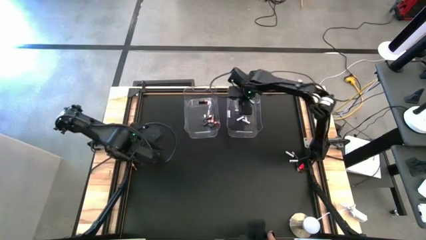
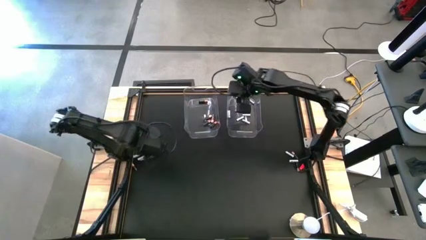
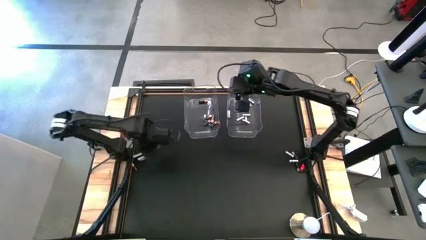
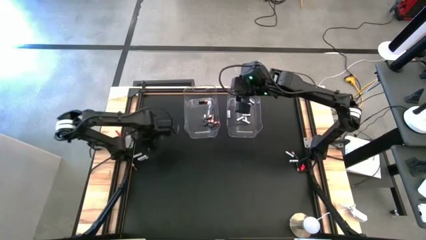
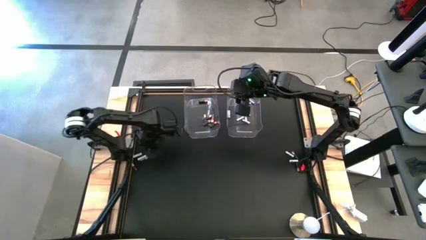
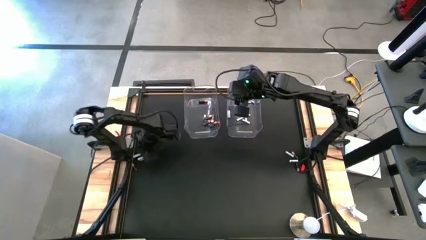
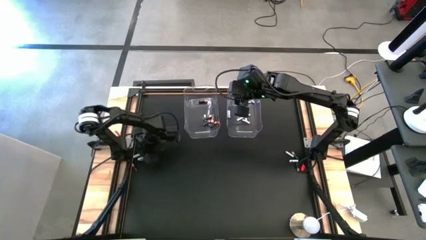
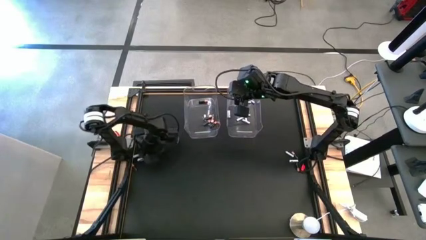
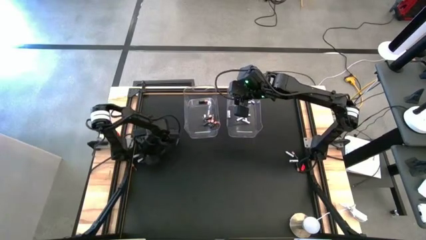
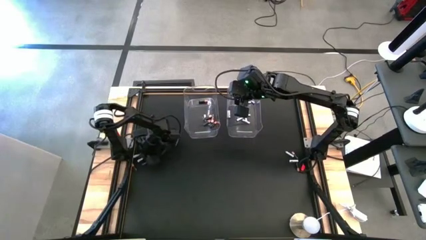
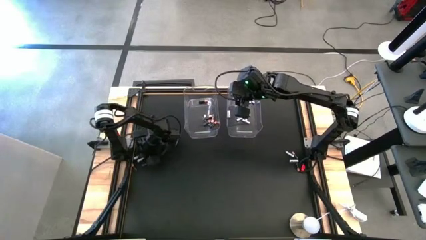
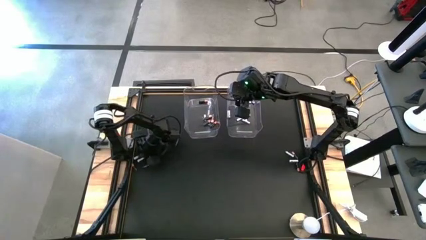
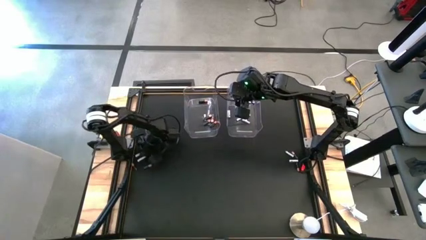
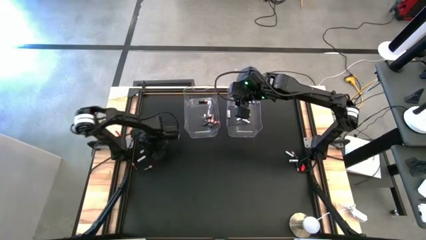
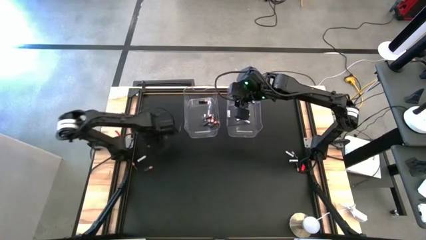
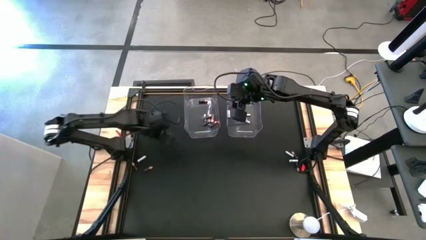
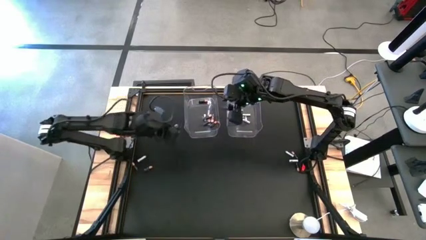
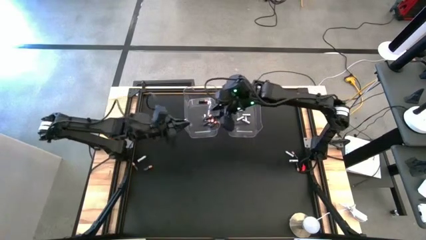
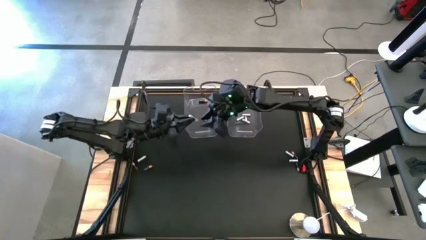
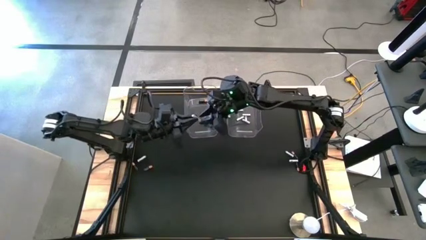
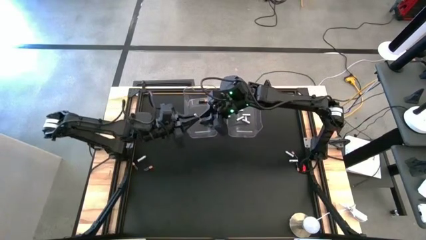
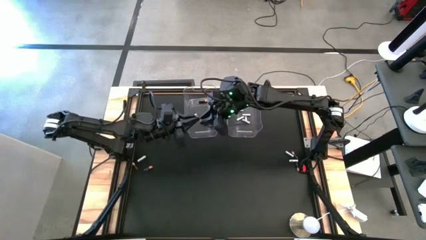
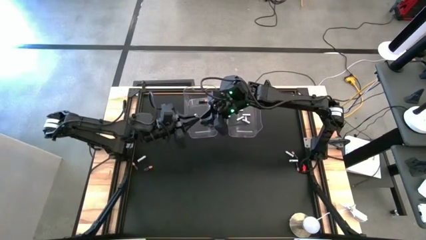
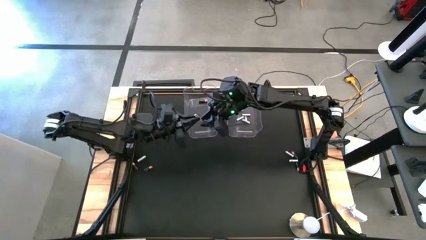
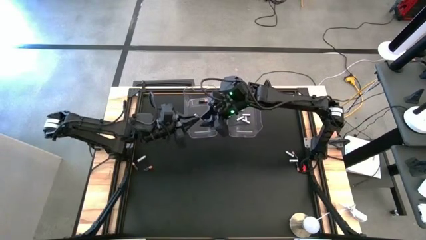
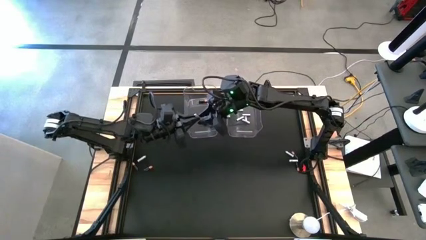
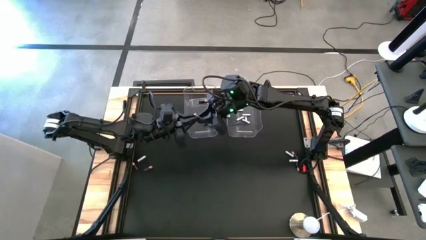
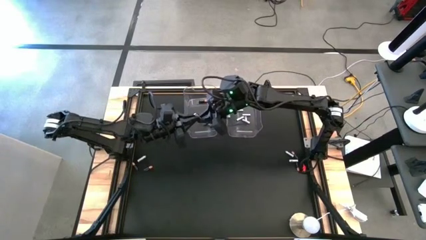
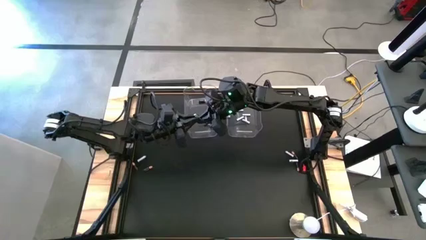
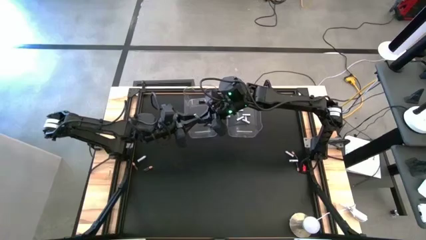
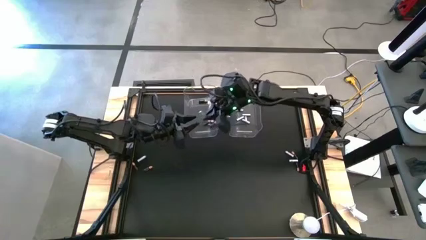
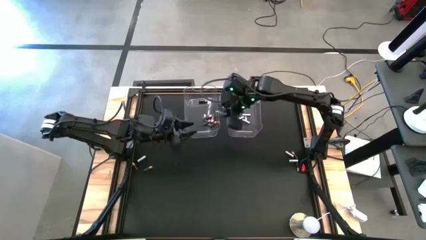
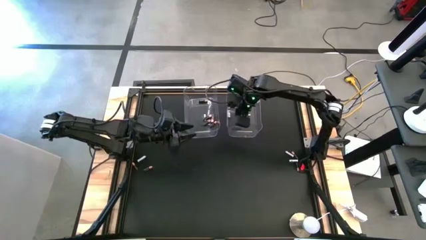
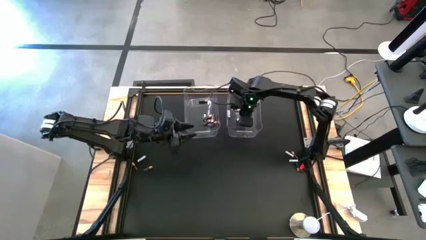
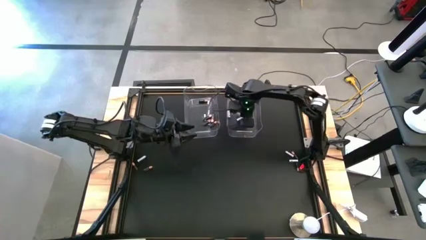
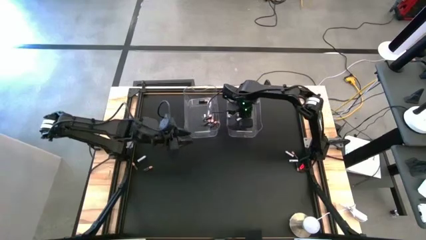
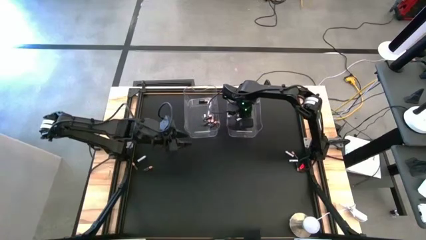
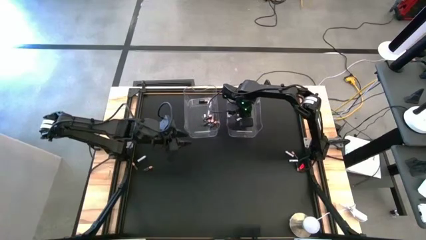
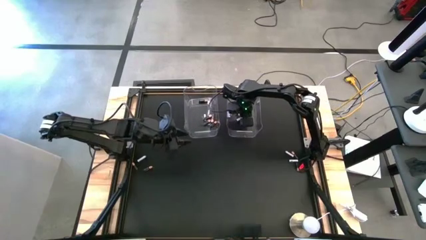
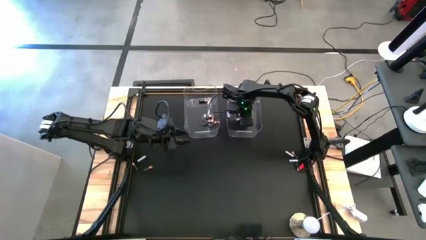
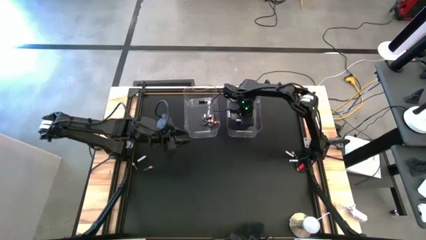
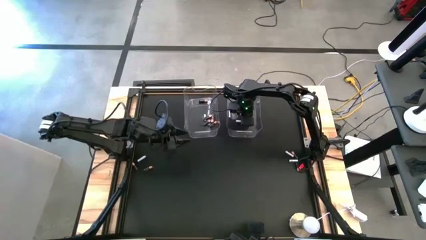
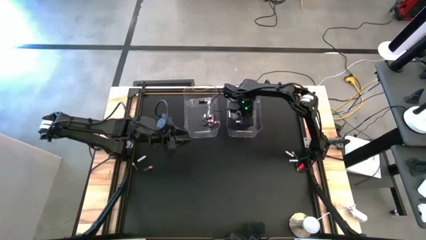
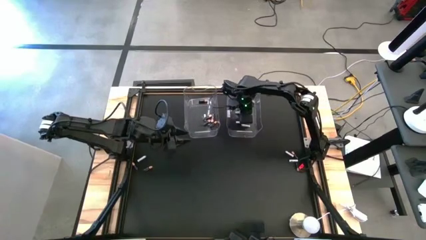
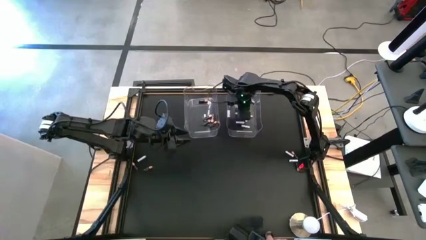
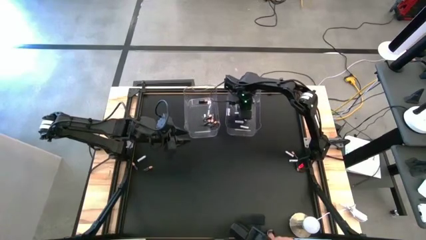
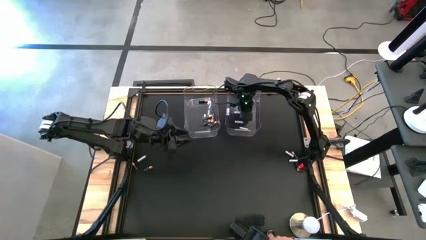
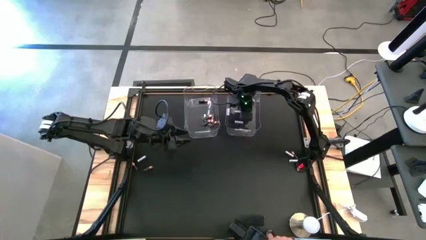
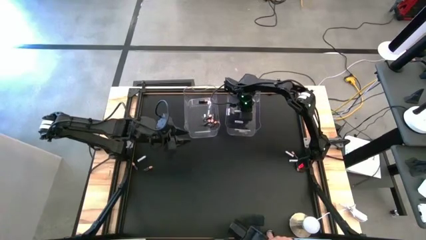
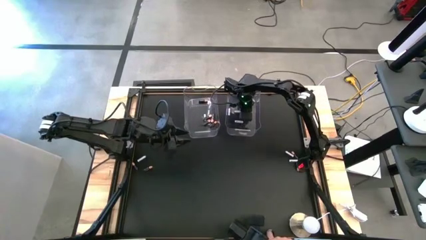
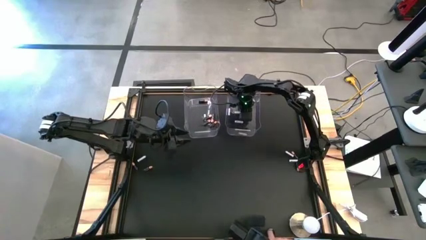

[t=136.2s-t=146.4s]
Task: Sort batteries
Put the white battery into the right transparent bin

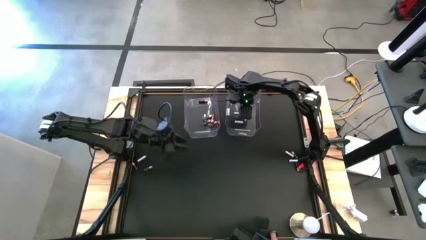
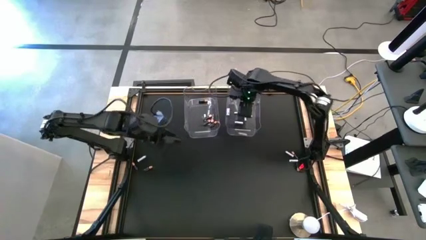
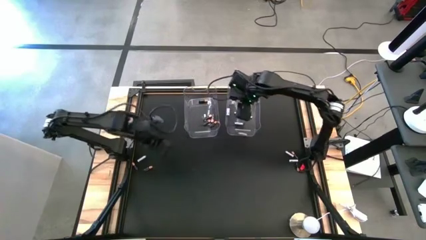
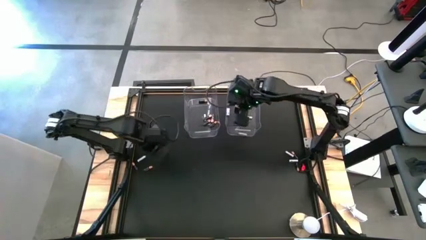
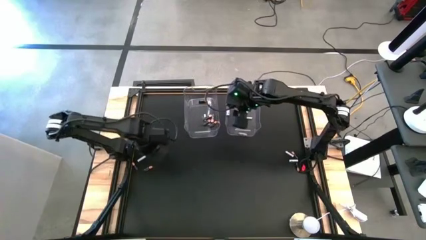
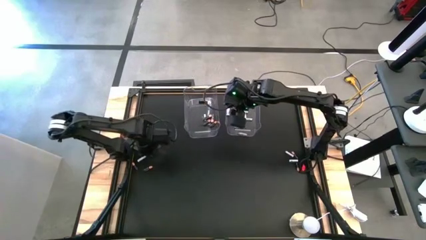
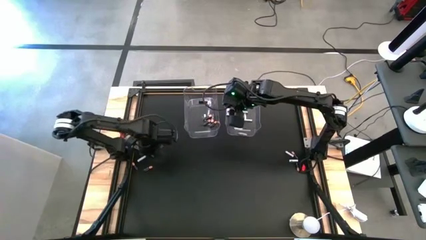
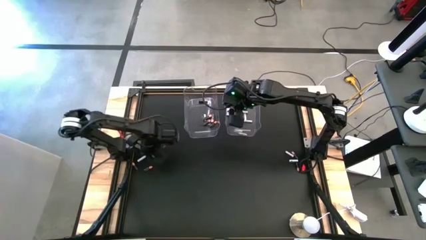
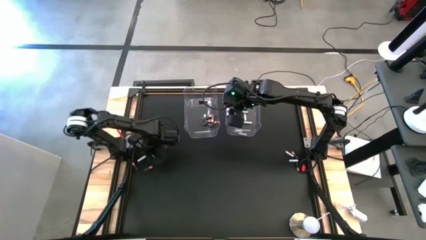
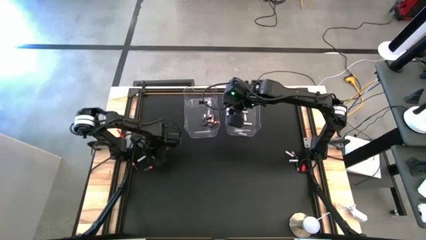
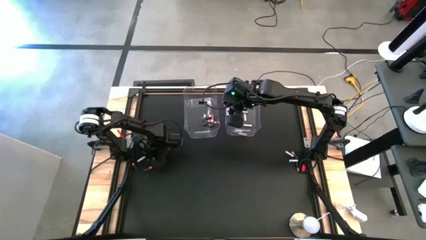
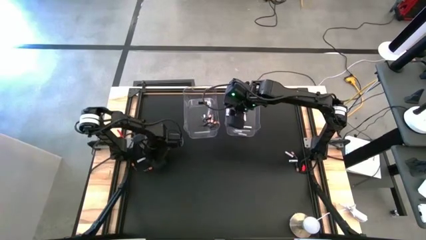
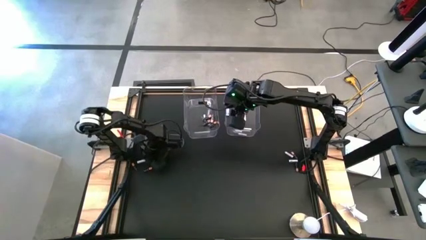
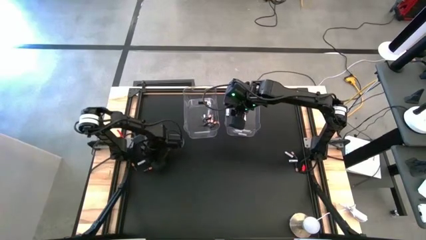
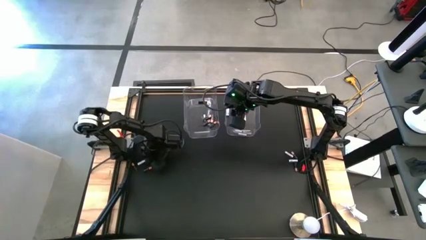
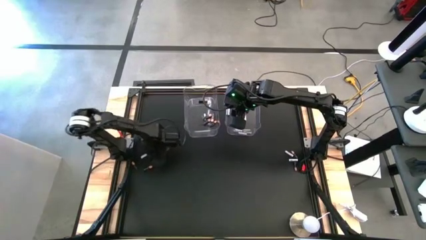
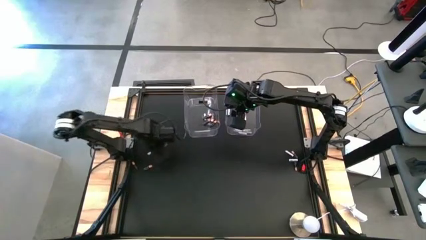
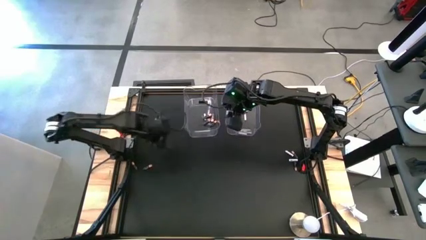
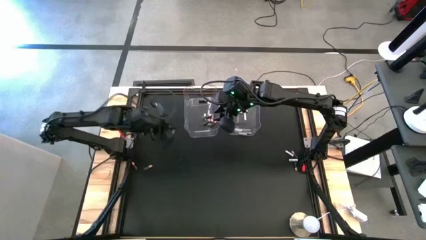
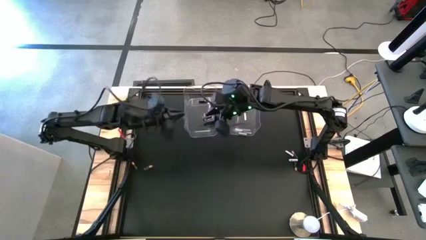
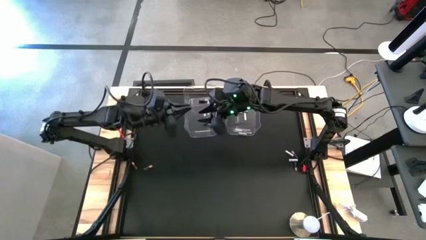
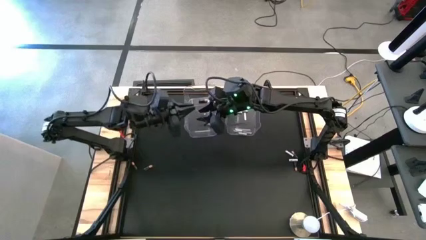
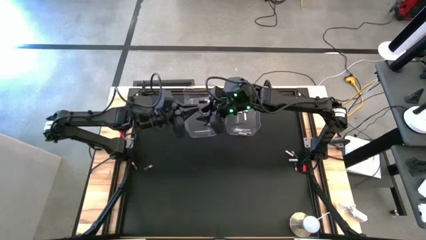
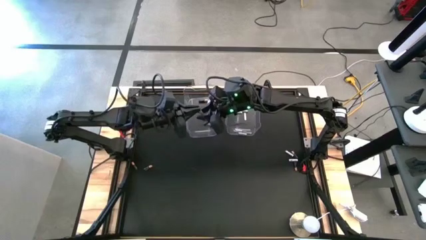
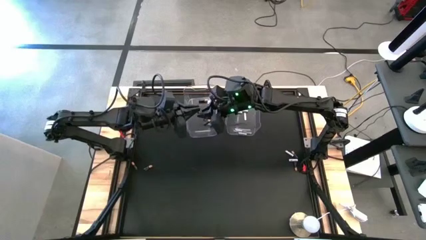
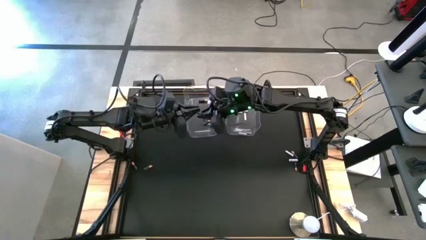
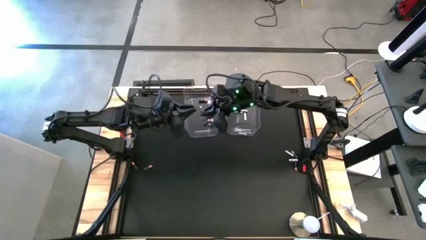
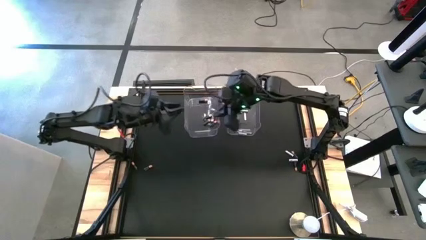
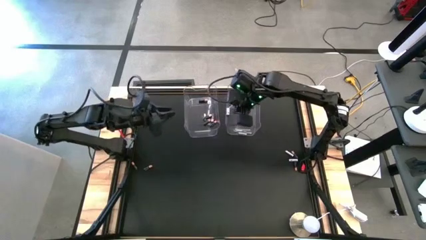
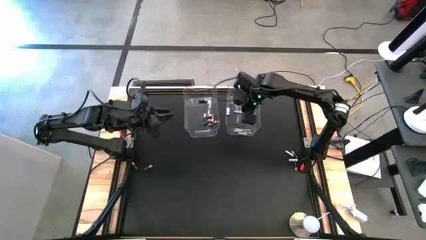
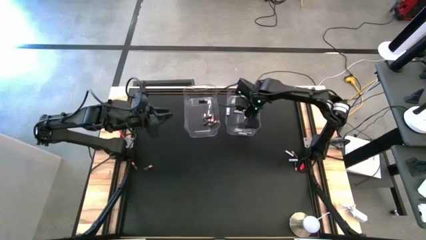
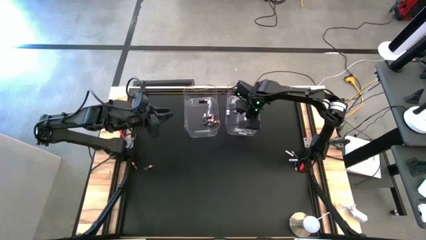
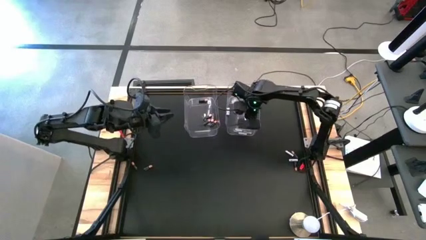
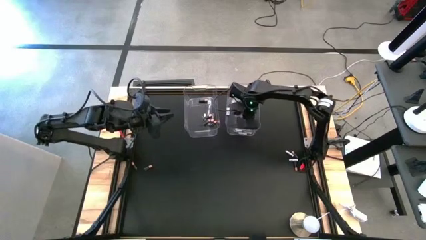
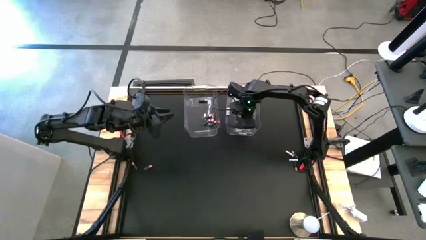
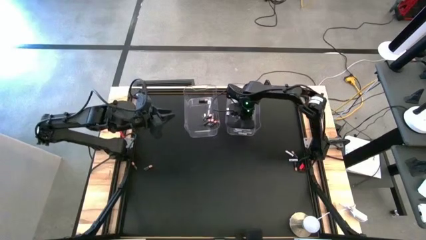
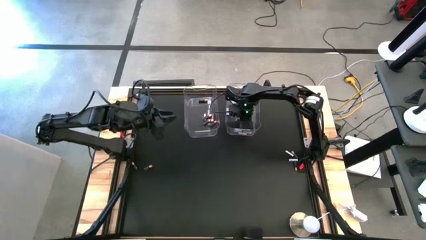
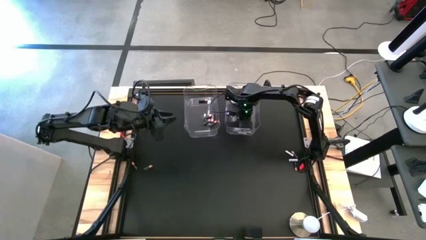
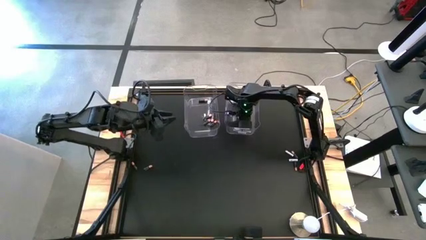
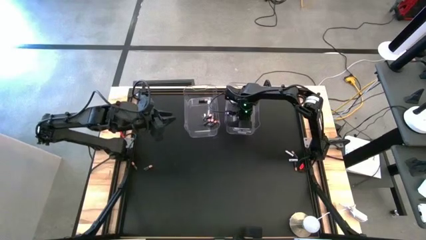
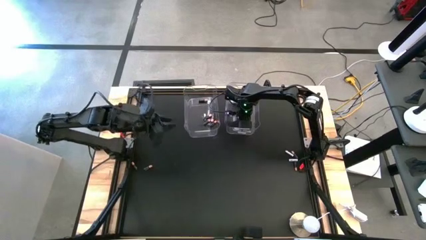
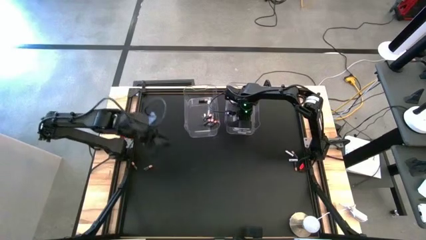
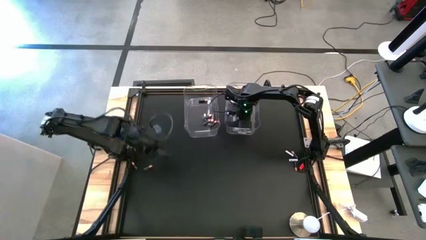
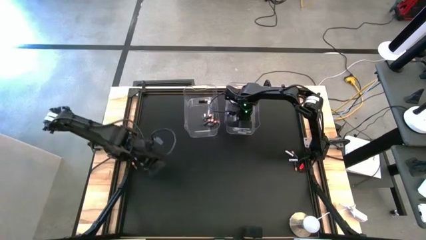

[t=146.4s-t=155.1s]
Put the white battery into the right transparent bin
